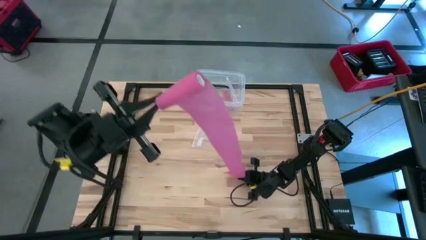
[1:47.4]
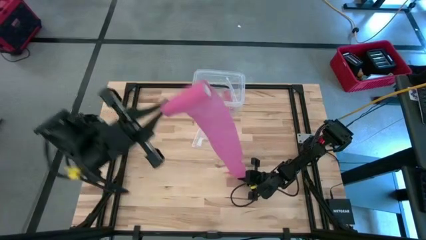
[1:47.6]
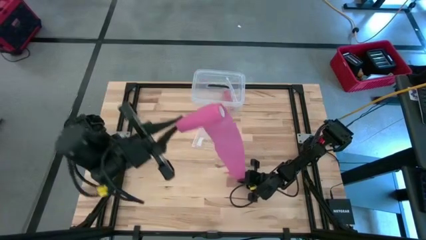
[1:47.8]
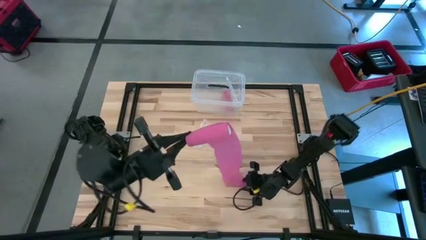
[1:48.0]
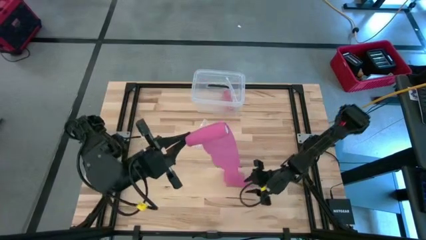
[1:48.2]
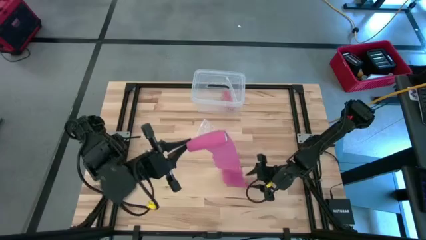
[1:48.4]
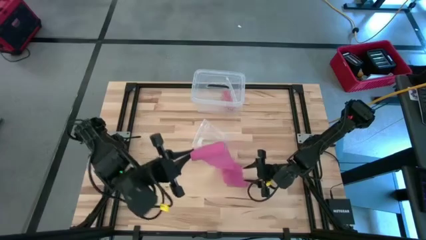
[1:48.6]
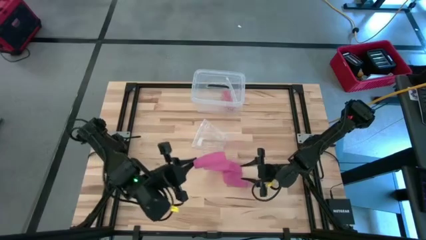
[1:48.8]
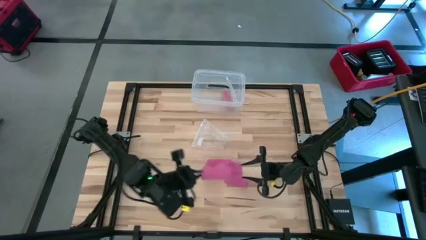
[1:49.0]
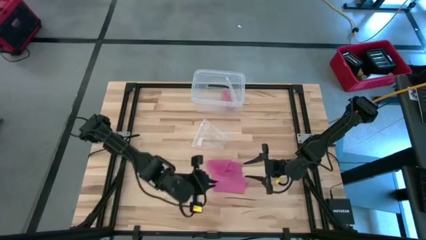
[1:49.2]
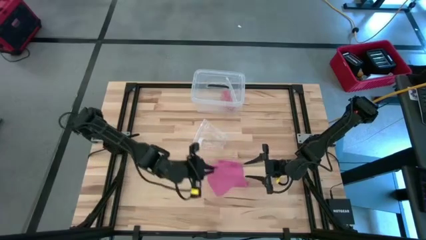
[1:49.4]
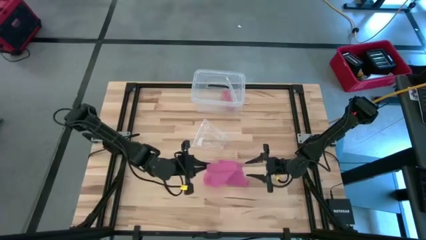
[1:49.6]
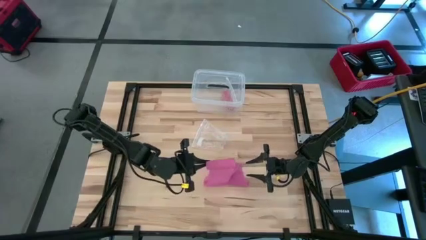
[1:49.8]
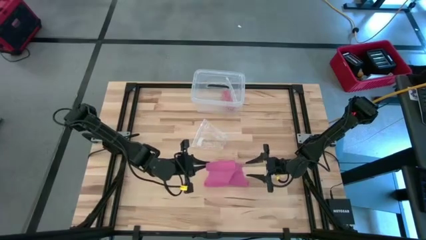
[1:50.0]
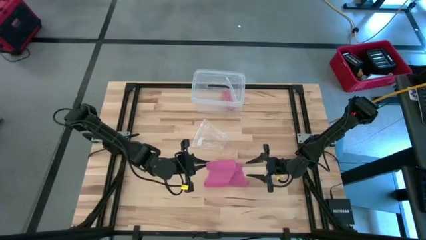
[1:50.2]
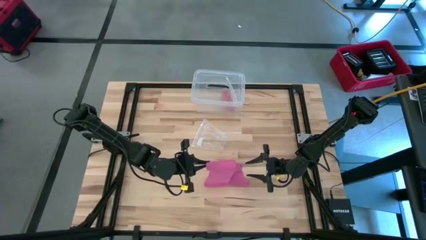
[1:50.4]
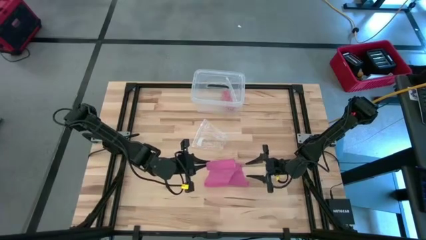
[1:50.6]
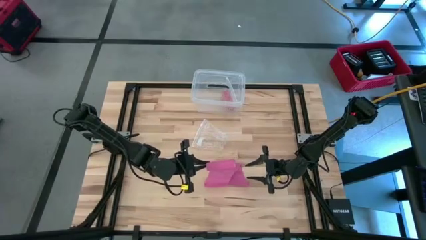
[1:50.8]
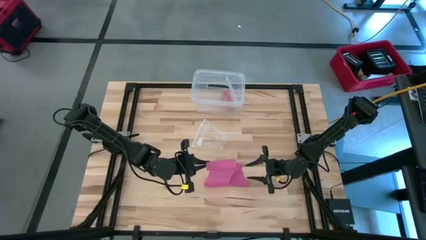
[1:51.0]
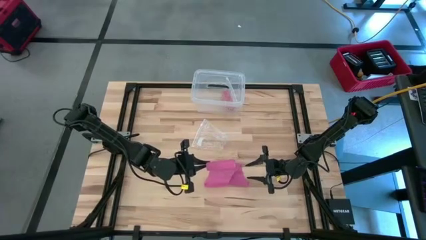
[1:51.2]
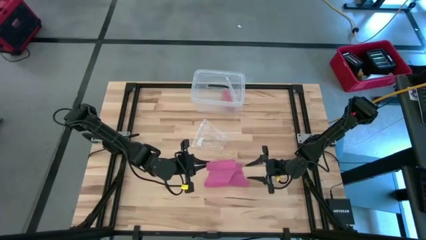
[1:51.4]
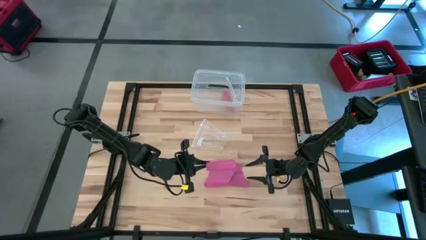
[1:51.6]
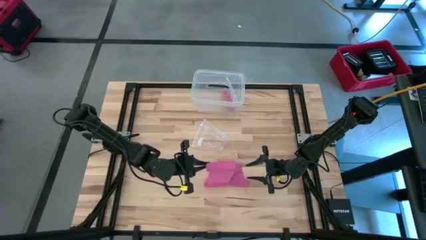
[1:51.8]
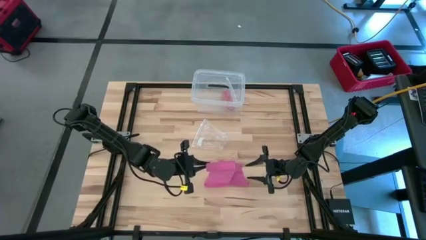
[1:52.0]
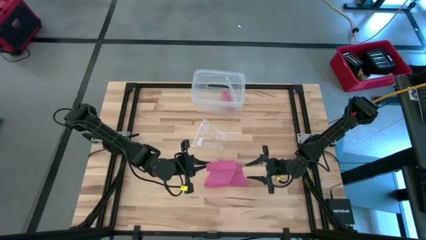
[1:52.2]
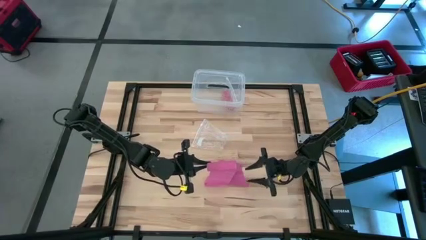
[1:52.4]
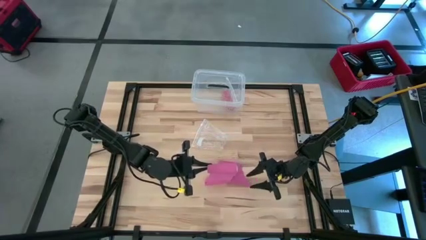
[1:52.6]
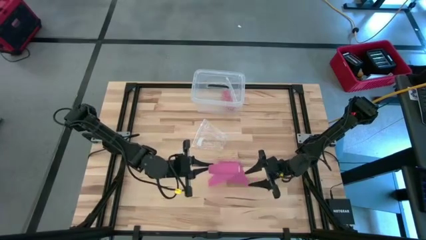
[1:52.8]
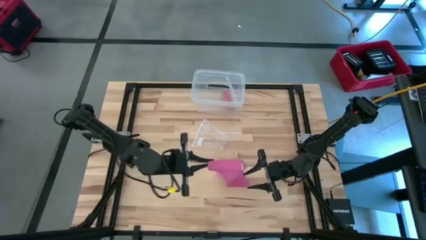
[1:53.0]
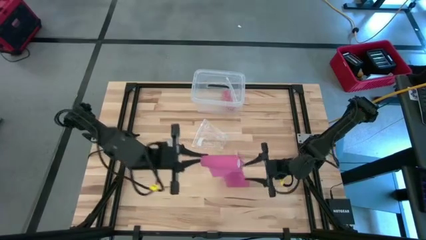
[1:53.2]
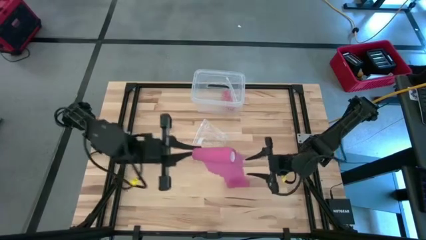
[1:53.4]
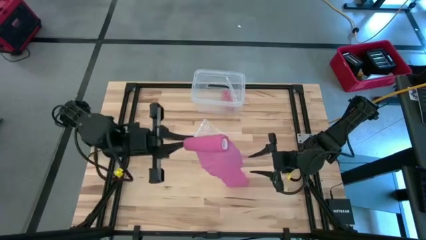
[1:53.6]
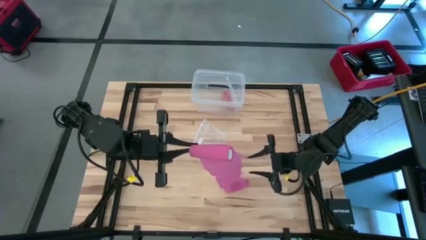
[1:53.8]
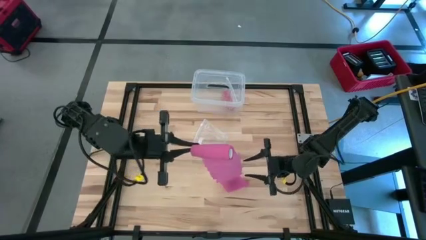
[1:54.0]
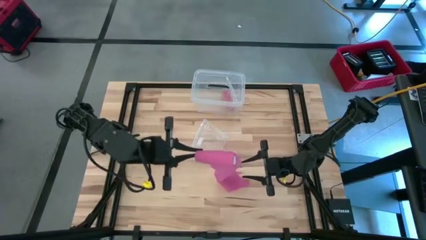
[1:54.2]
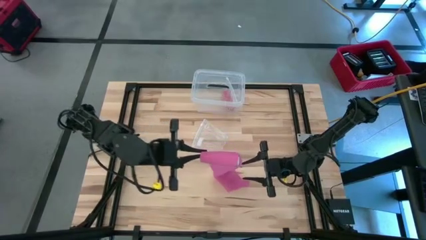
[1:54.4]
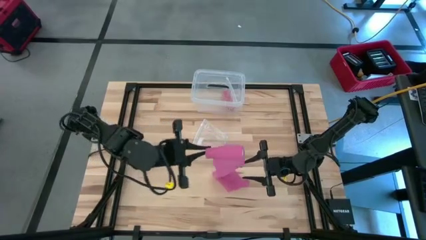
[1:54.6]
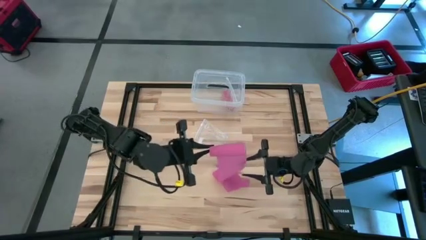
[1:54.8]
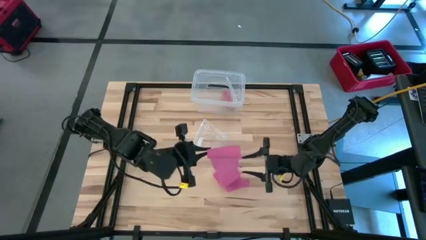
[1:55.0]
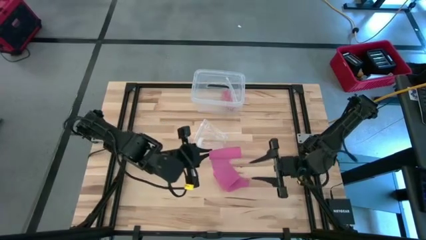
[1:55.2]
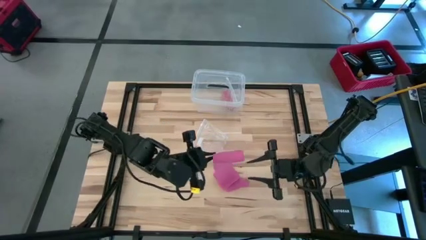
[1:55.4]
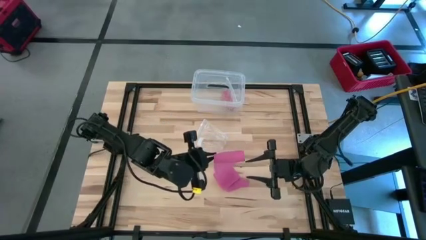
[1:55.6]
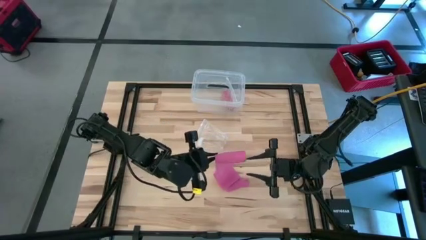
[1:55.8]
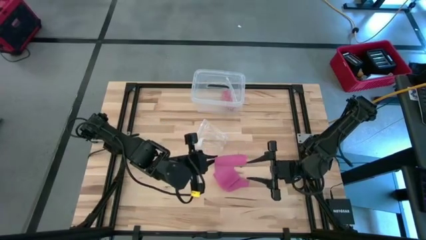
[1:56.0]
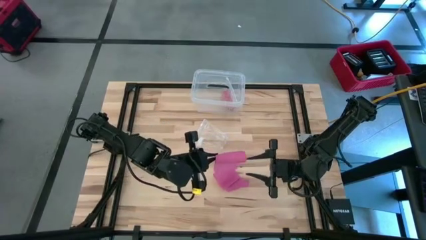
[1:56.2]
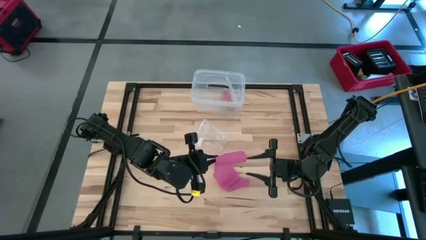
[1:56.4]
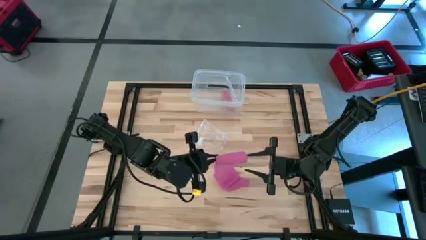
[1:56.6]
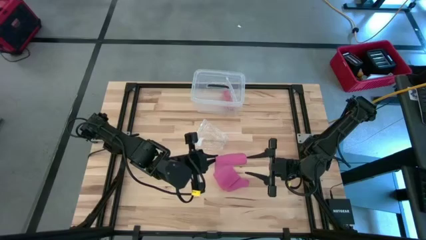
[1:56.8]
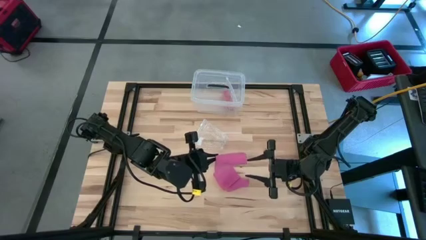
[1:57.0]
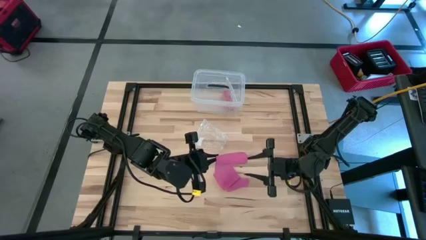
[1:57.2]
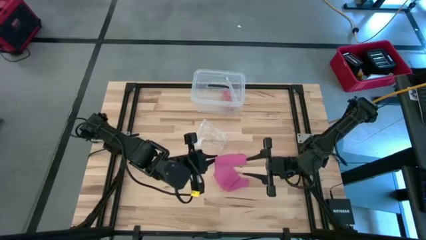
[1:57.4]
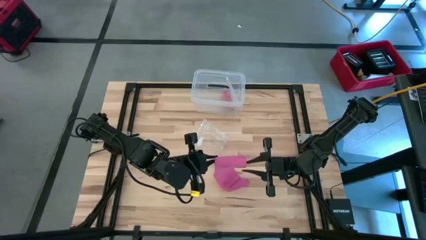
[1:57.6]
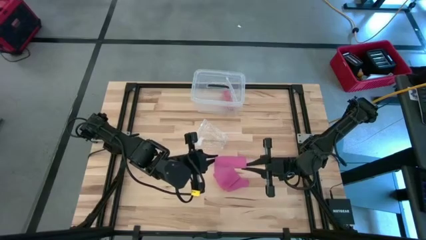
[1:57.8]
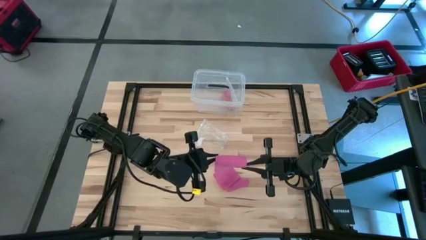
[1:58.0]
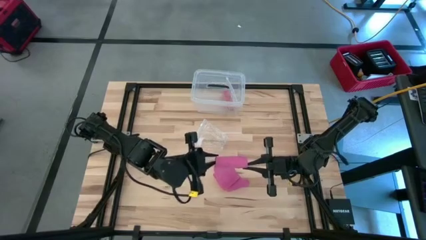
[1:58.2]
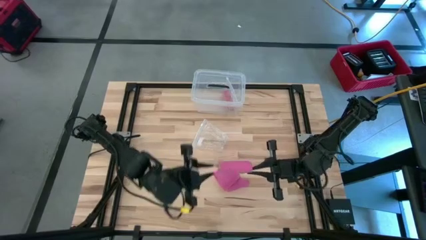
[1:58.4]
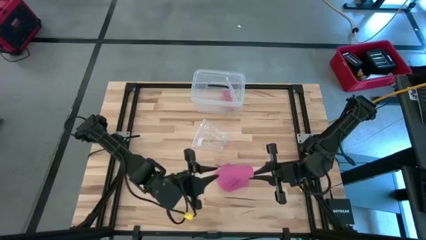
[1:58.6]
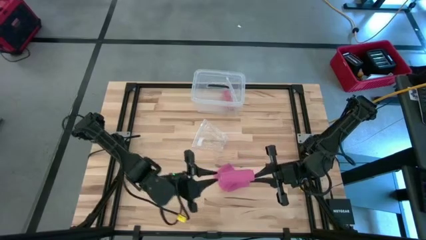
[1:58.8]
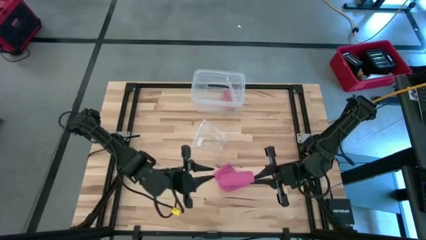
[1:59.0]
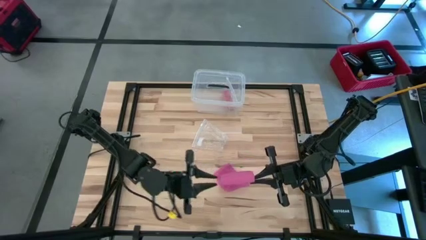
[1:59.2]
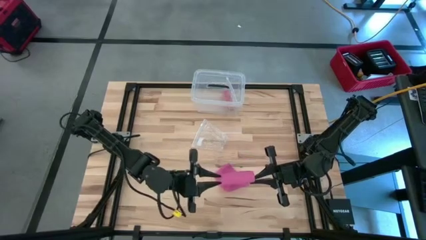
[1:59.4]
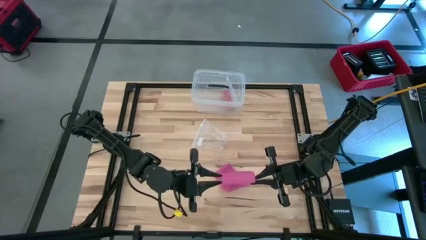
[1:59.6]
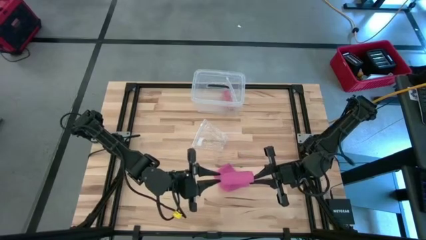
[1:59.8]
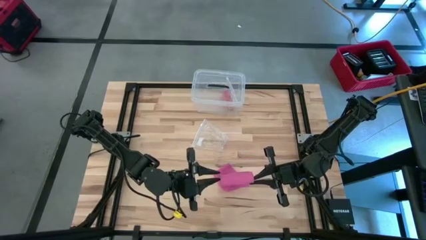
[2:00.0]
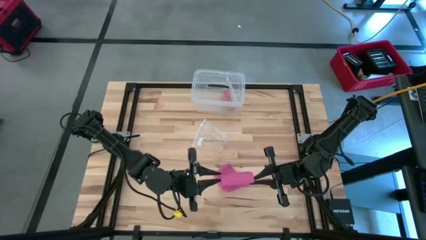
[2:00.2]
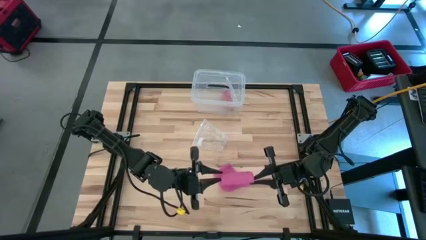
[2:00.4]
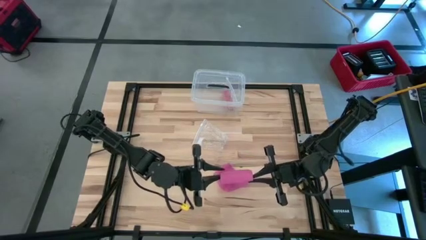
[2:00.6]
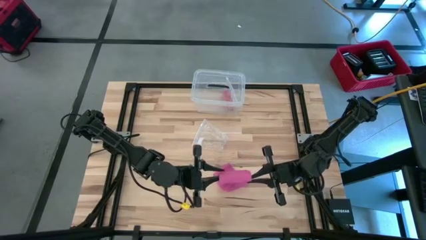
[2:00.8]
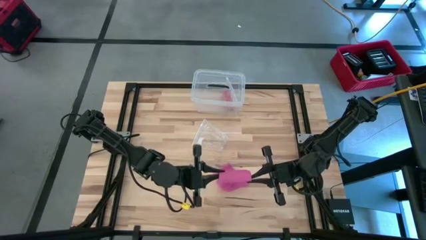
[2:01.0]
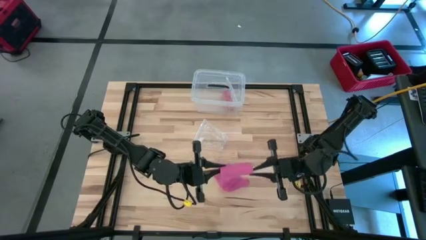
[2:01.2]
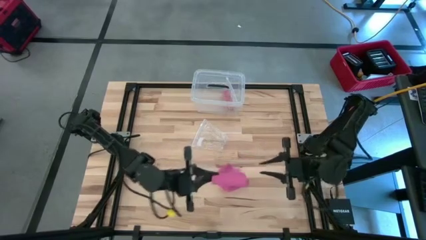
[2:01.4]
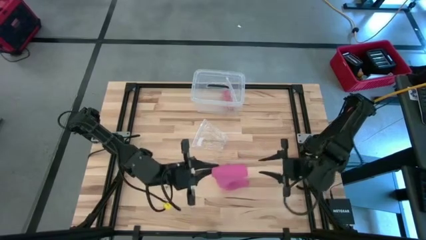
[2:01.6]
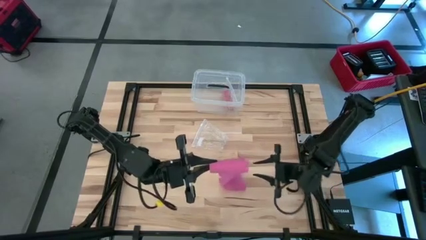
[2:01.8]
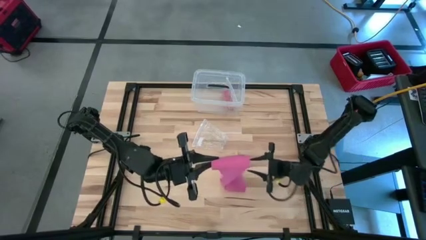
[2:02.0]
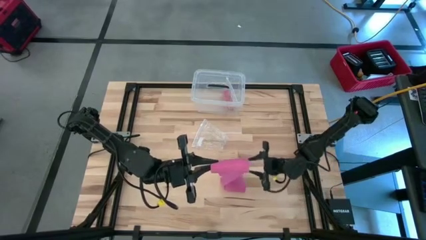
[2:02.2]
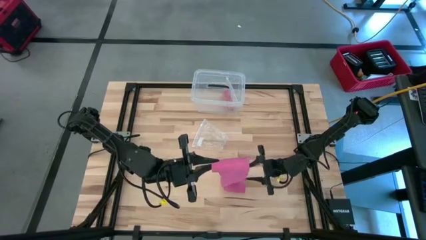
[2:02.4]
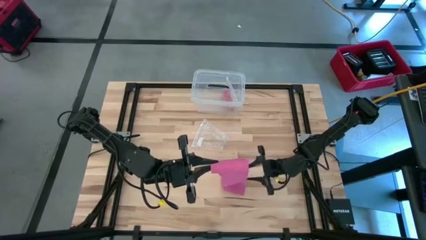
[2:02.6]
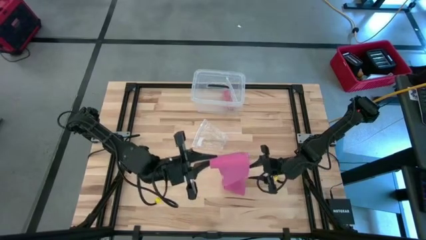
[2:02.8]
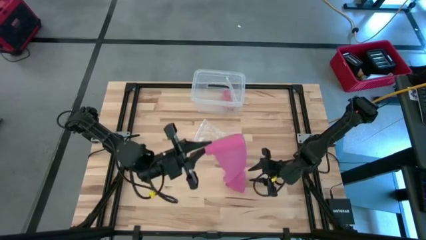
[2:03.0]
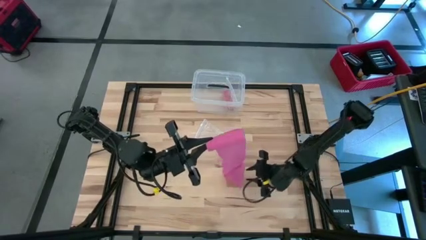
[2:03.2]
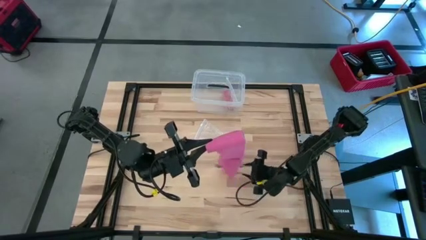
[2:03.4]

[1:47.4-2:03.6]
Task: Roll bandage
Roll the pink bandage
